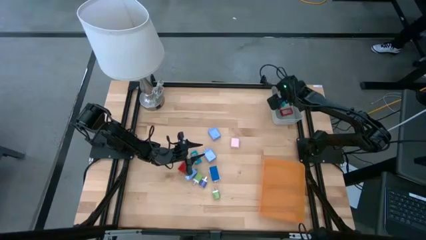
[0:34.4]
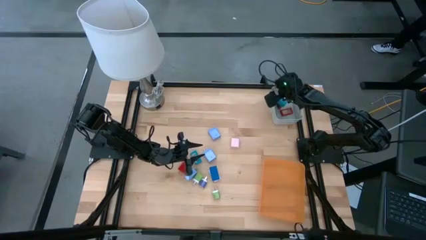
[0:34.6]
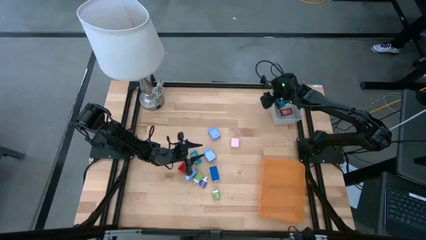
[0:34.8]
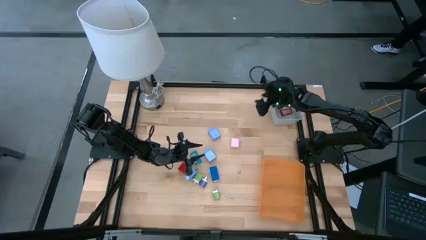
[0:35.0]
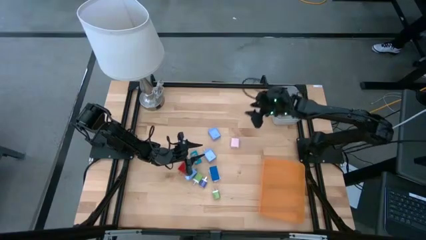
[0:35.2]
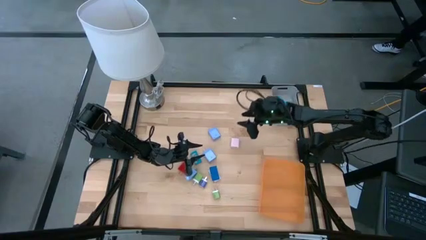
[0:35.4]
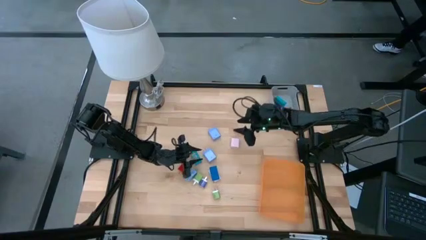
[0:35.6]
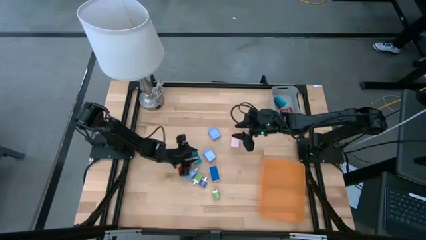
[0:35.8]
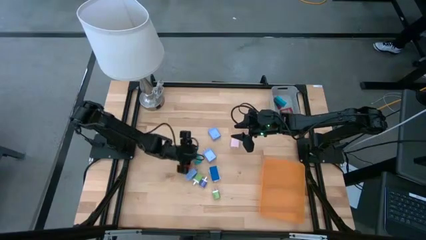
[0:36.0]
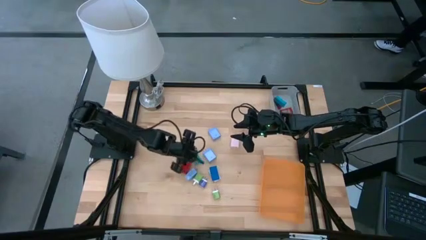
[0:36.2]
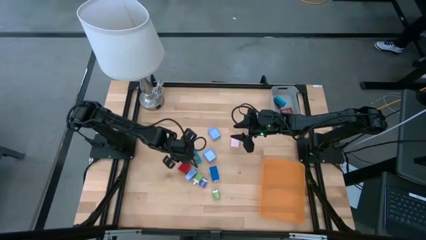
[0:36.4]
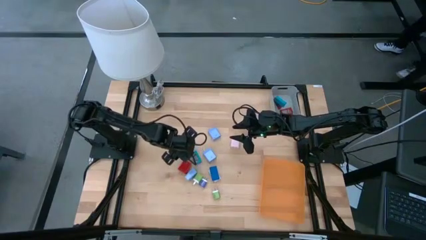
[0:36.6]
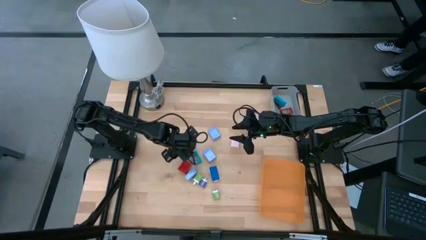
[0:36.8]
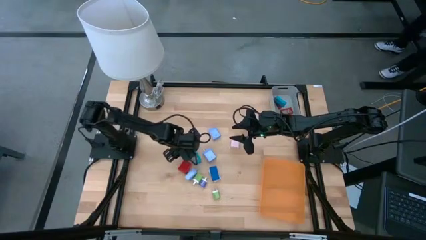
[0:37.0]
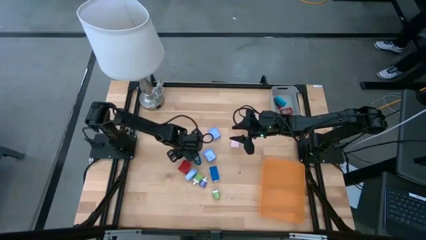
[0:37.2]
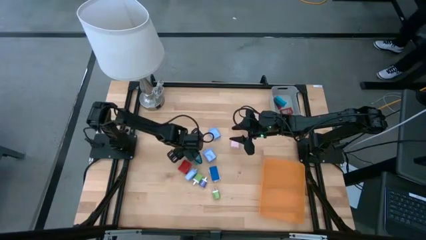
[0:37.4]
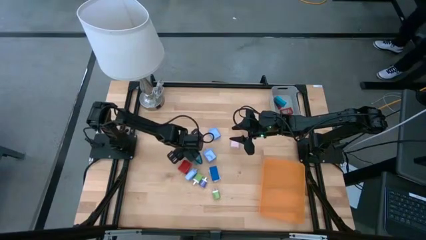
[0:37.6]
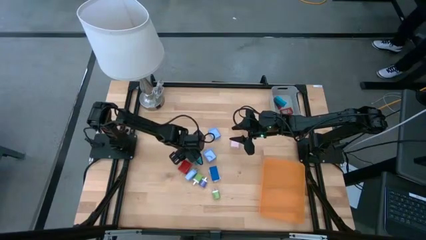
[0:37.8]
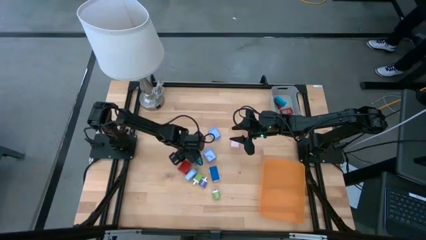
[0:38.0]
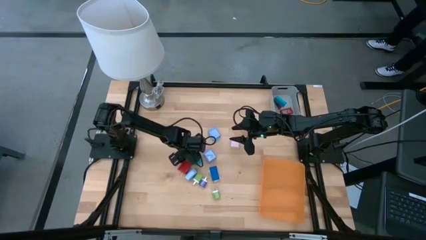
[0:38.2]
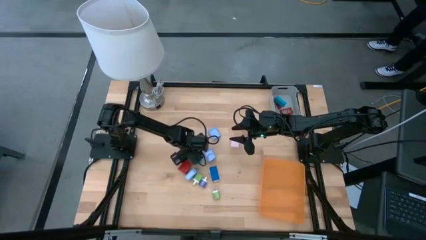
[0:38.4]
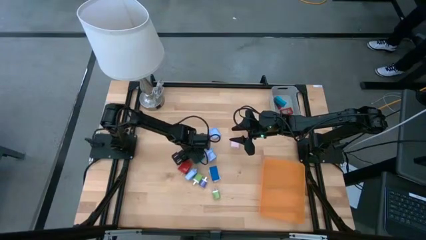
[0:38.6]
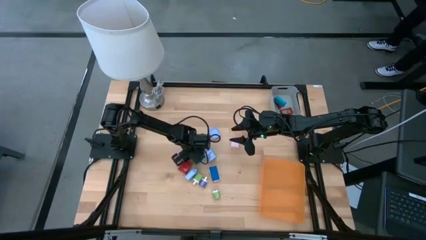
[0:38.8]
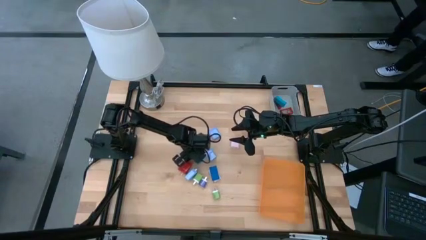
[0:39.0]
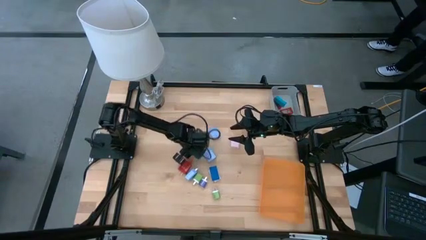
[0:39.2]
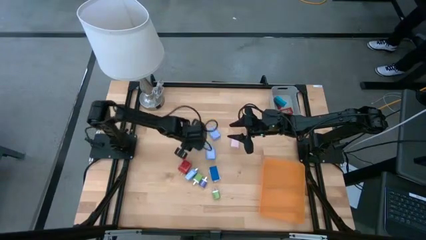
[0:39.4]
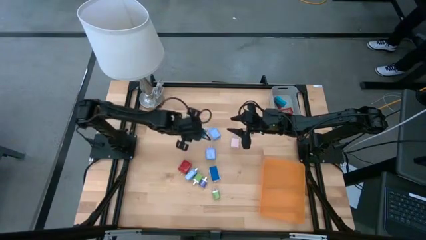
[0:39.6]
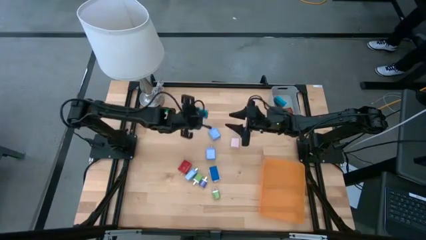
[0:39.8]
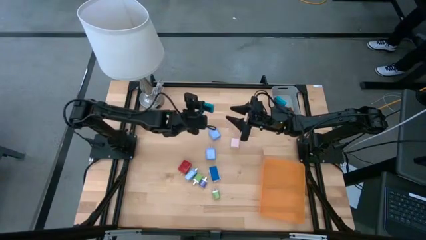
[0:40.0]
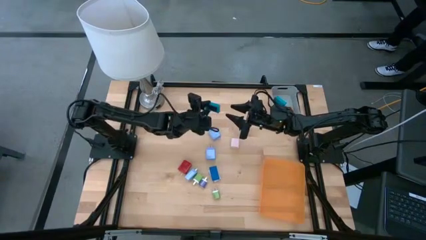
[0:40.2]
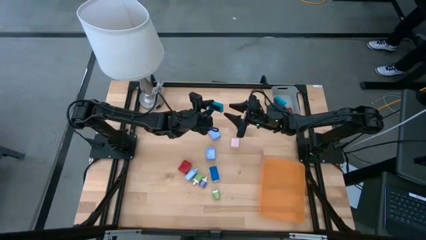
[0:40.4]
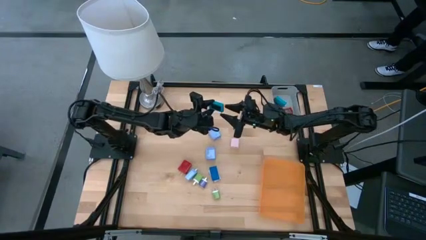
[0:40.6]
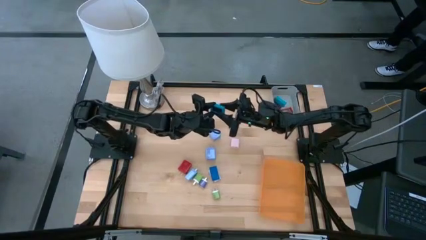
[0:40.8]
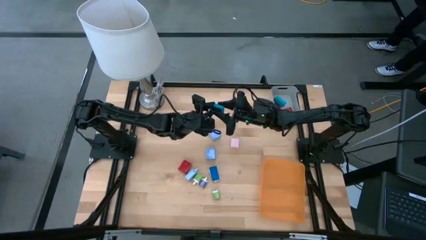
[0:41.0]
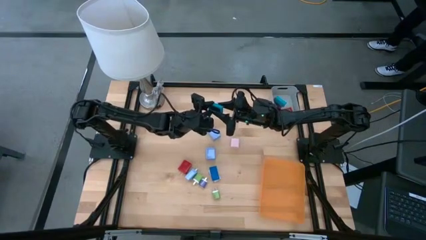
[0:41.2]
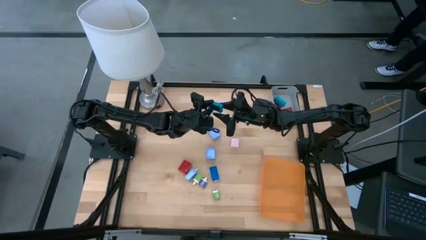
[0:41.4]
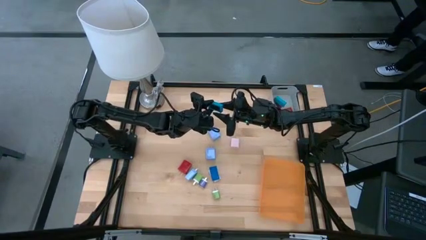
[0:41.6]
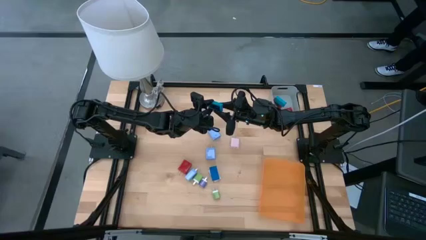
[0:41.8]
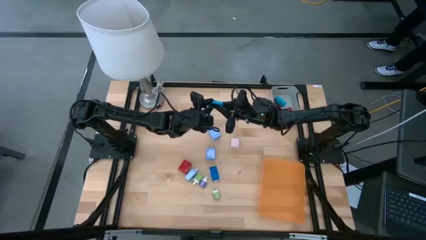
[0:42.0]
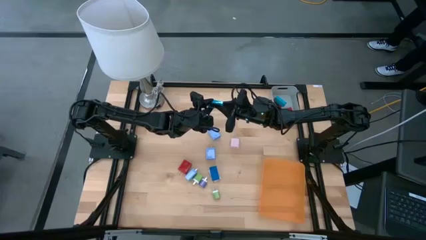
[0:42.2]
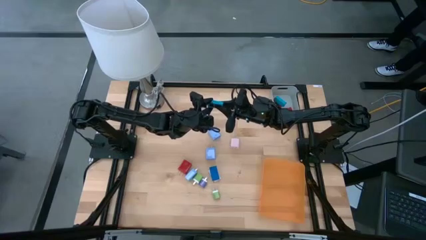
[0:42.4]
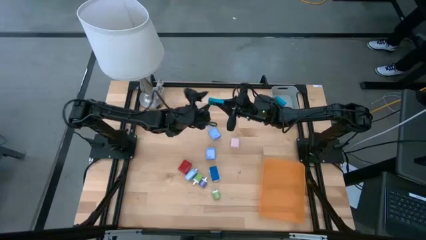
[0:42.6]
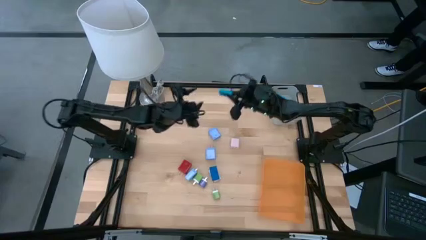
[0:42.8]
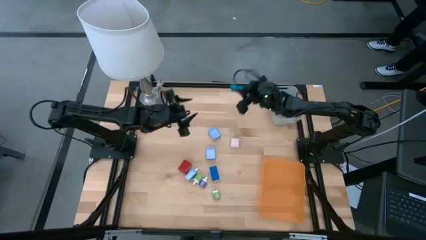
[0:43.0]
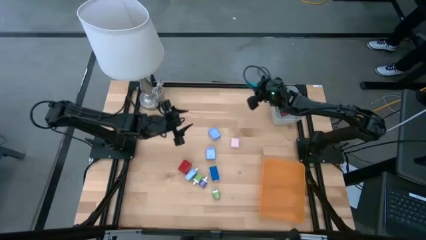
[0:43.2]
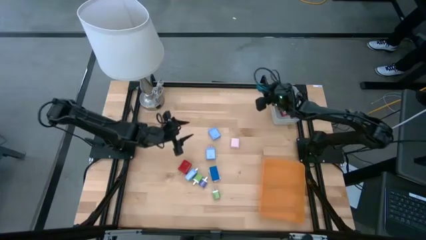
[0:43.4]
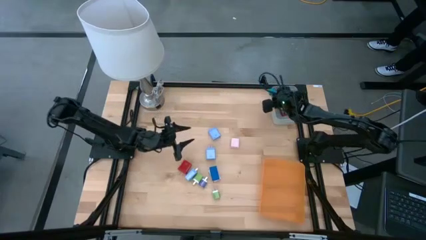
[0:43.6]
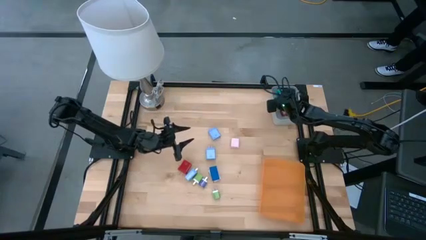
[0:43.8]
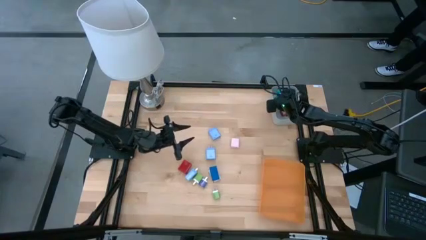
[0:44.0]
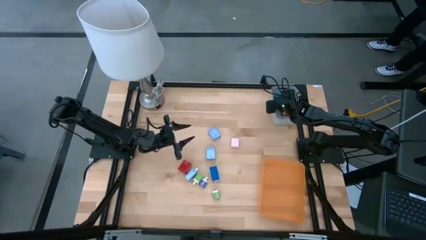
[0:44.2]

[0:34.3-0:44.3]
Task: Pick & Place Office items
Put the light blue digital clock into the gray bin
